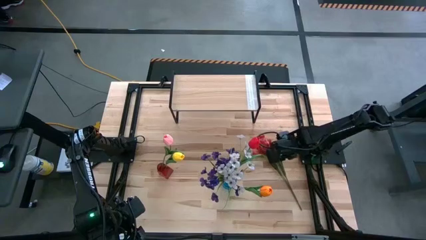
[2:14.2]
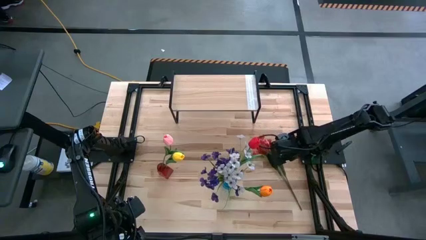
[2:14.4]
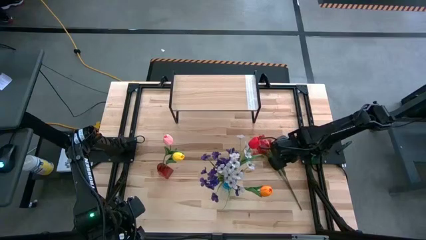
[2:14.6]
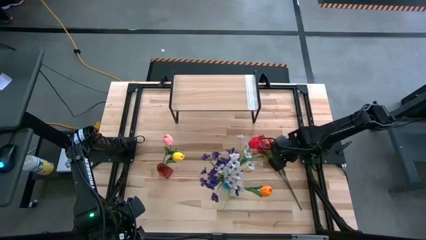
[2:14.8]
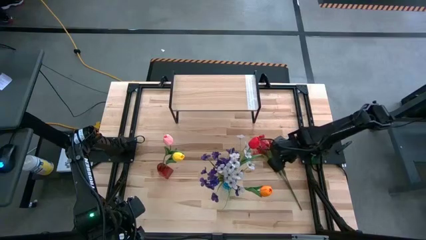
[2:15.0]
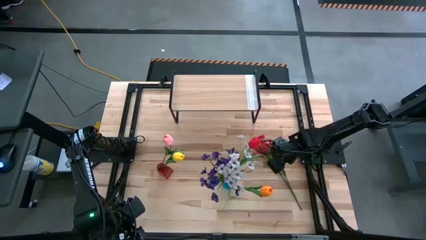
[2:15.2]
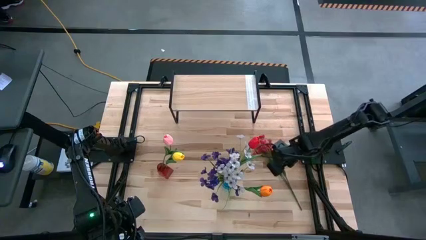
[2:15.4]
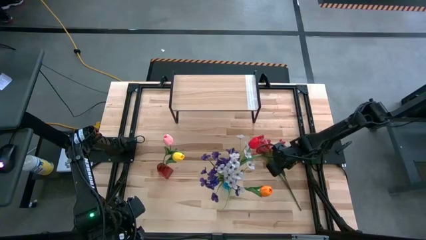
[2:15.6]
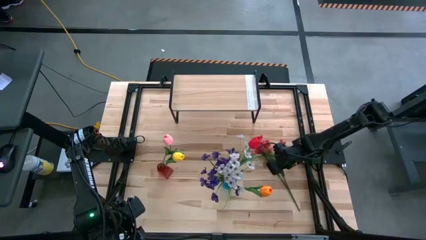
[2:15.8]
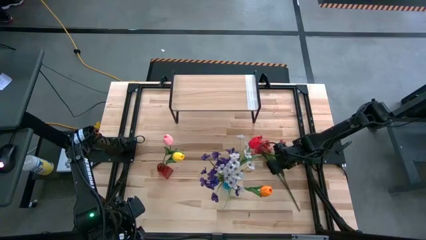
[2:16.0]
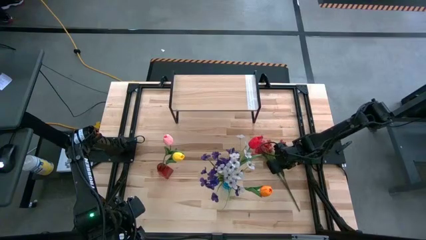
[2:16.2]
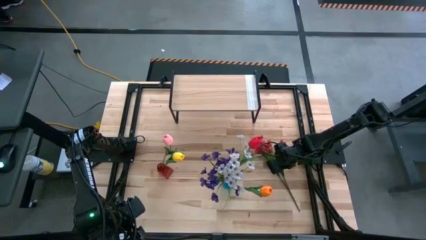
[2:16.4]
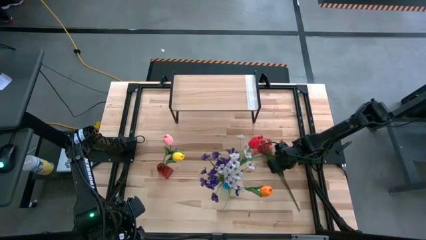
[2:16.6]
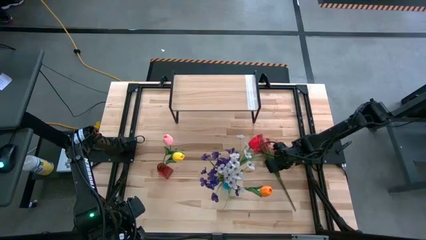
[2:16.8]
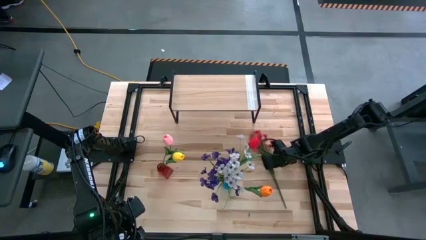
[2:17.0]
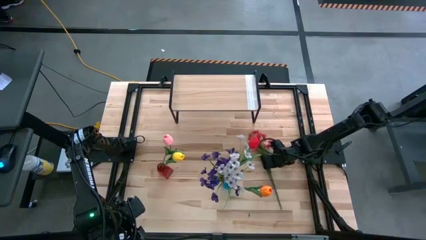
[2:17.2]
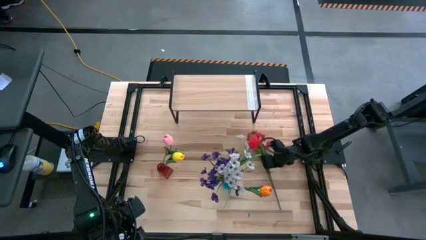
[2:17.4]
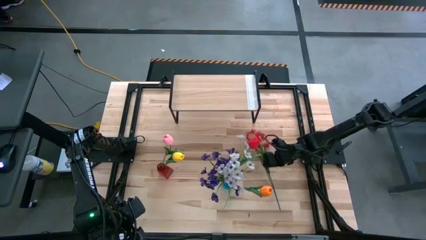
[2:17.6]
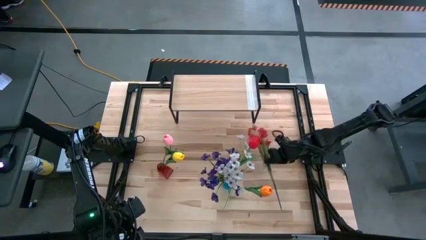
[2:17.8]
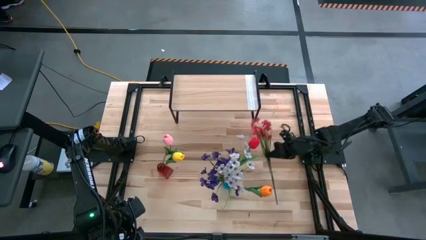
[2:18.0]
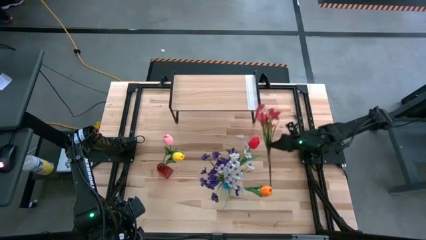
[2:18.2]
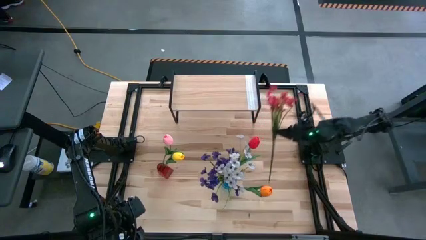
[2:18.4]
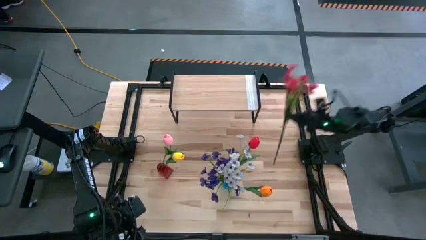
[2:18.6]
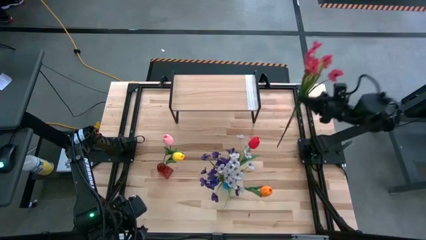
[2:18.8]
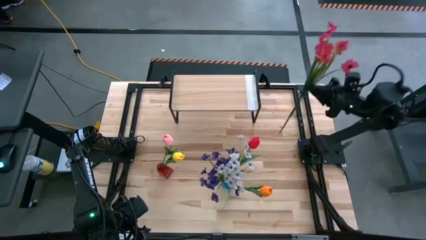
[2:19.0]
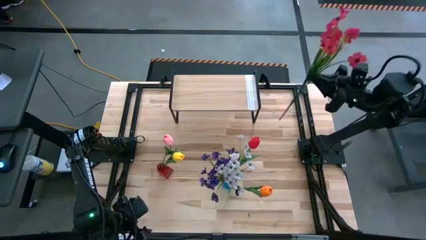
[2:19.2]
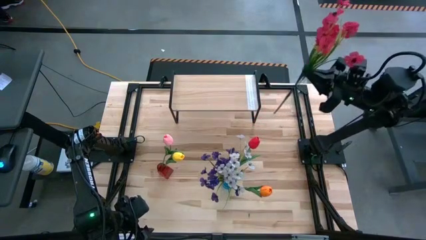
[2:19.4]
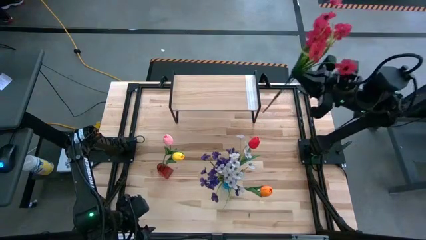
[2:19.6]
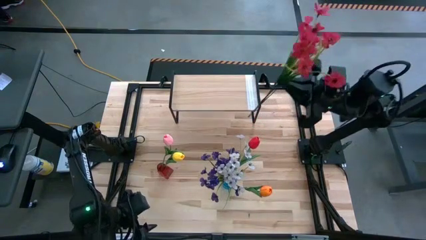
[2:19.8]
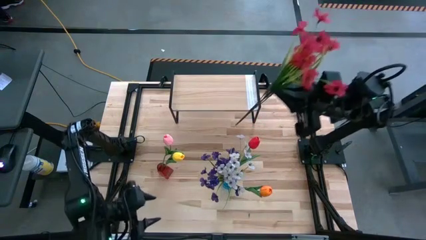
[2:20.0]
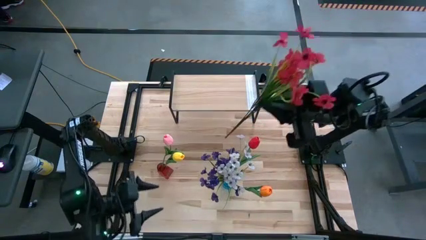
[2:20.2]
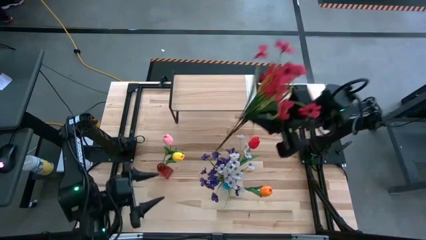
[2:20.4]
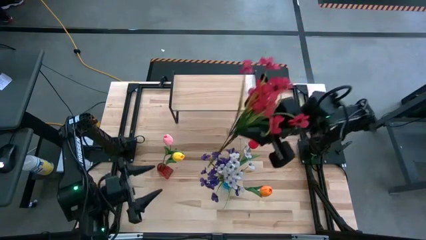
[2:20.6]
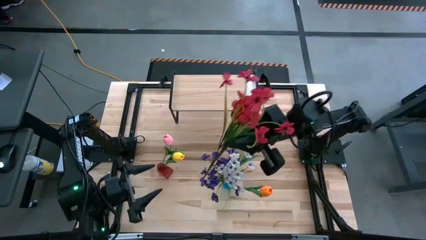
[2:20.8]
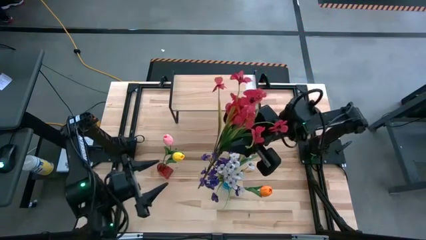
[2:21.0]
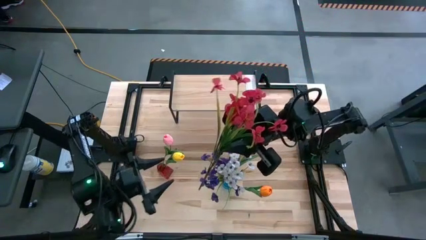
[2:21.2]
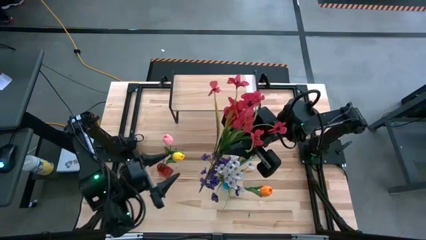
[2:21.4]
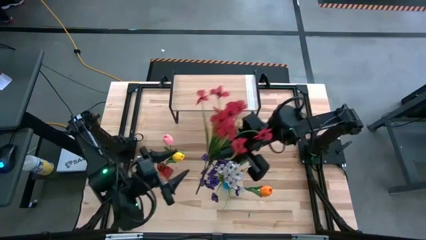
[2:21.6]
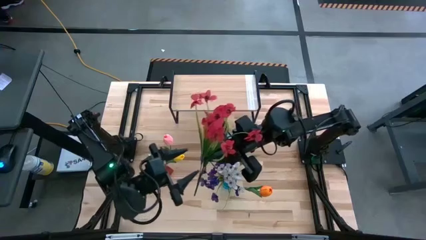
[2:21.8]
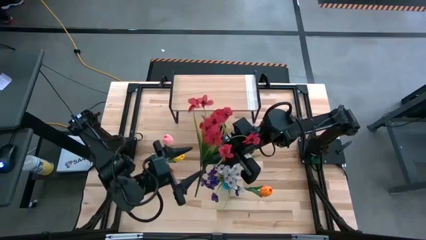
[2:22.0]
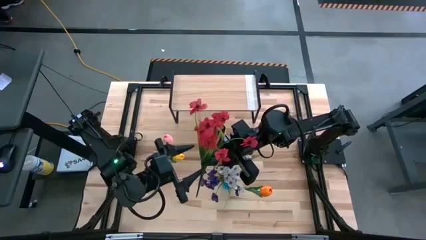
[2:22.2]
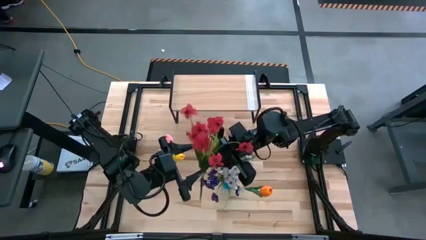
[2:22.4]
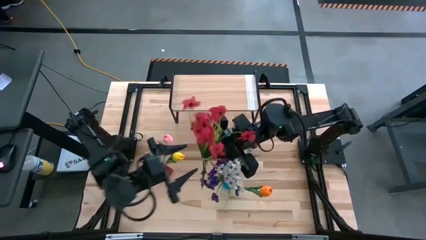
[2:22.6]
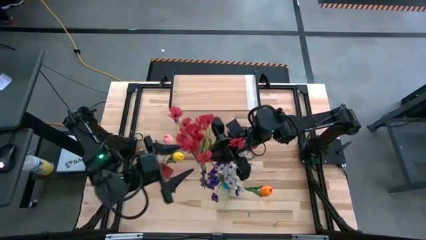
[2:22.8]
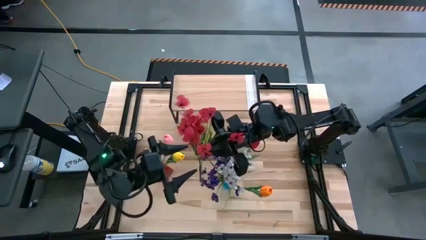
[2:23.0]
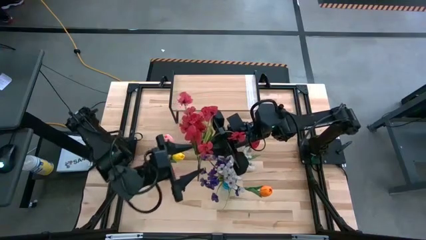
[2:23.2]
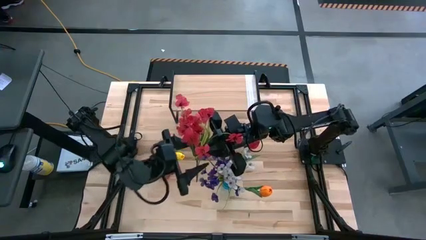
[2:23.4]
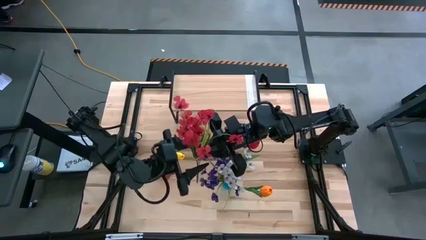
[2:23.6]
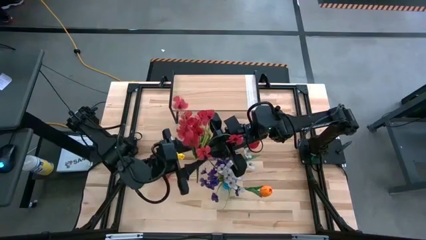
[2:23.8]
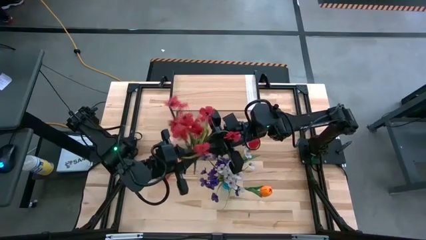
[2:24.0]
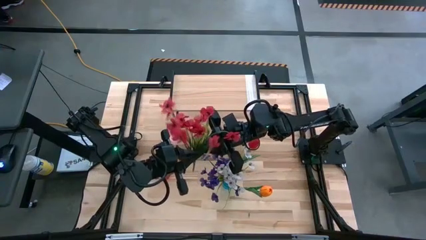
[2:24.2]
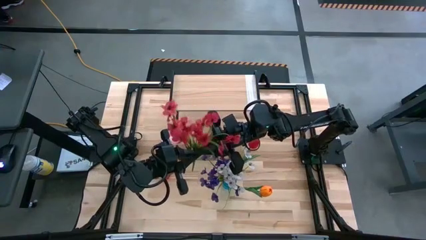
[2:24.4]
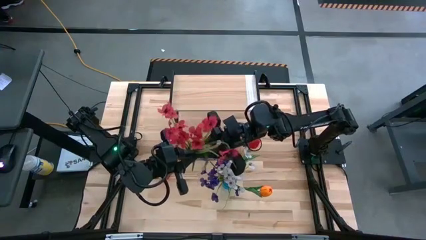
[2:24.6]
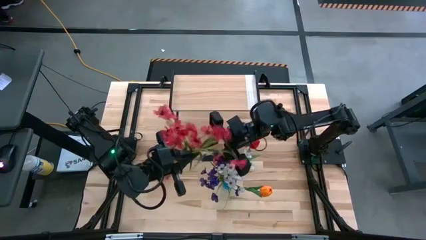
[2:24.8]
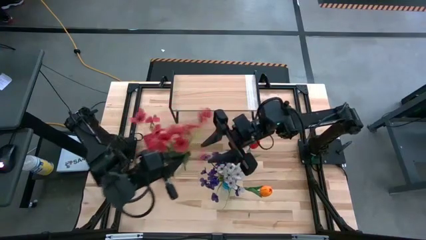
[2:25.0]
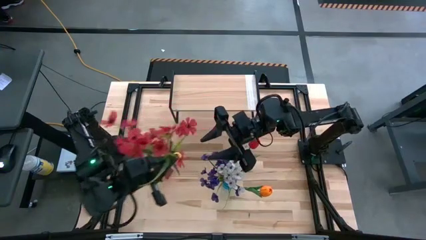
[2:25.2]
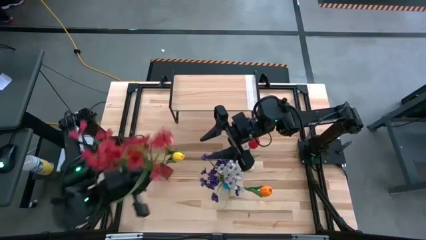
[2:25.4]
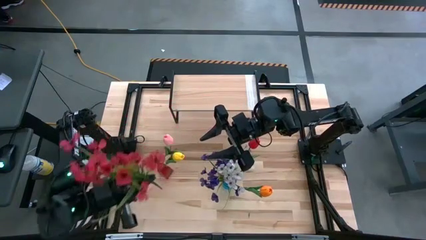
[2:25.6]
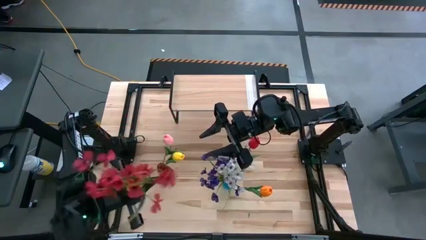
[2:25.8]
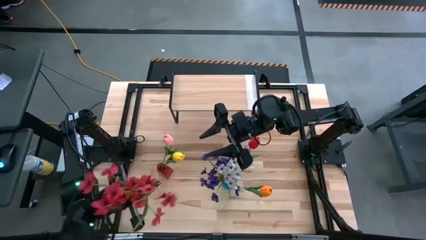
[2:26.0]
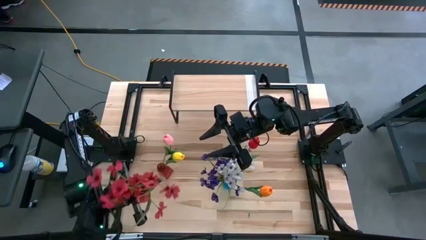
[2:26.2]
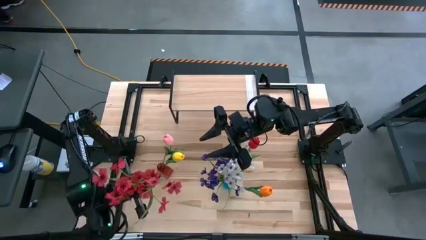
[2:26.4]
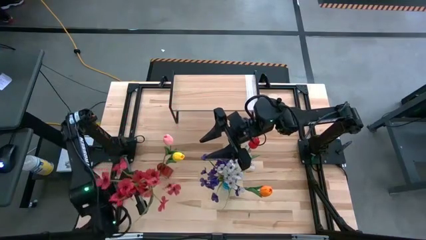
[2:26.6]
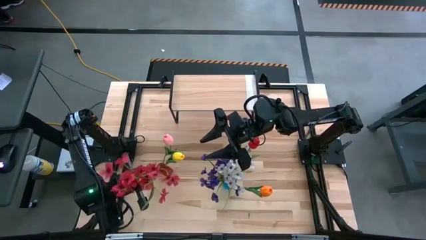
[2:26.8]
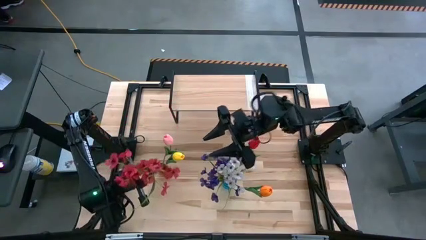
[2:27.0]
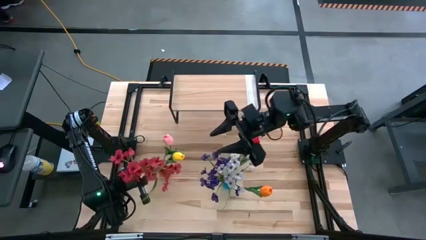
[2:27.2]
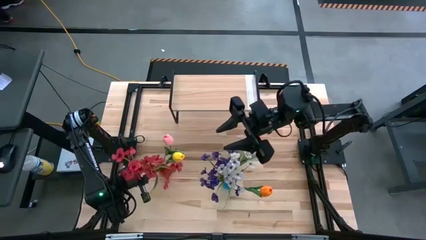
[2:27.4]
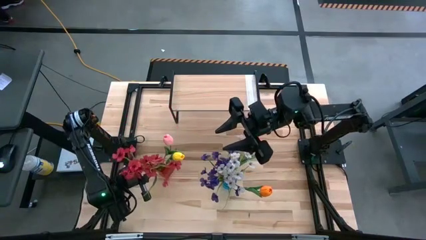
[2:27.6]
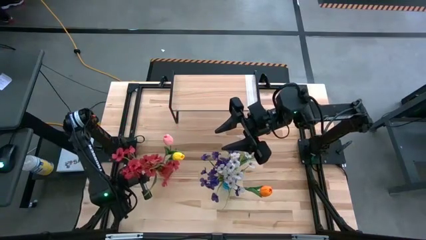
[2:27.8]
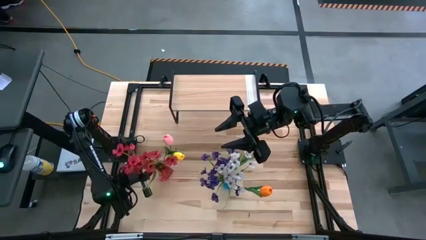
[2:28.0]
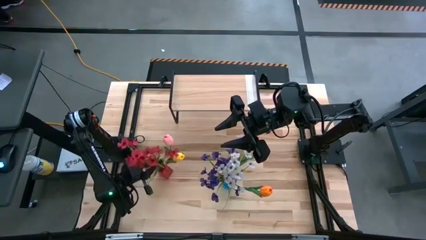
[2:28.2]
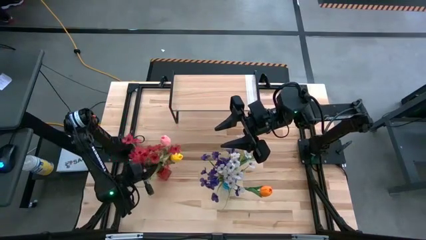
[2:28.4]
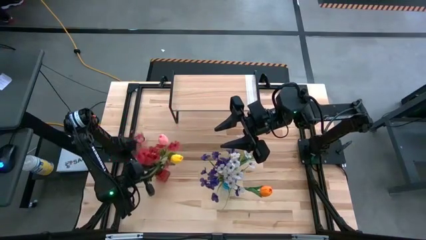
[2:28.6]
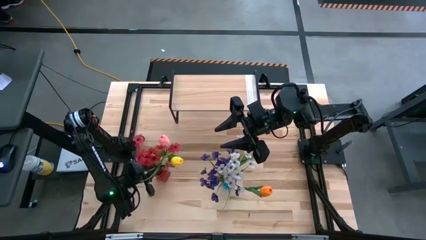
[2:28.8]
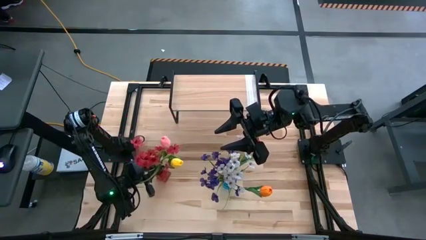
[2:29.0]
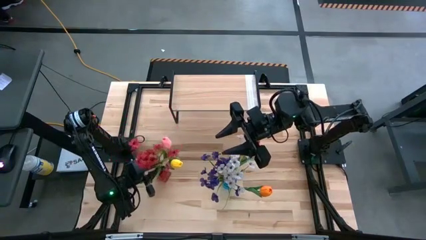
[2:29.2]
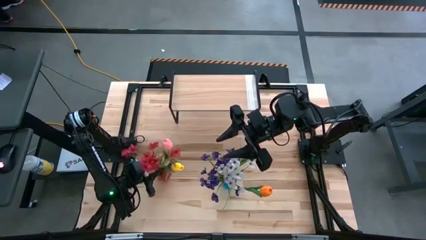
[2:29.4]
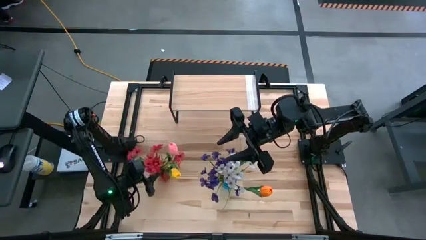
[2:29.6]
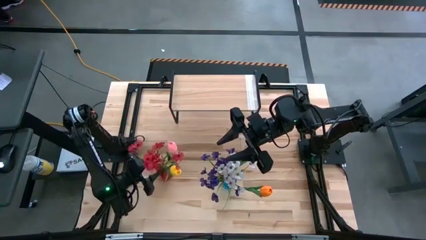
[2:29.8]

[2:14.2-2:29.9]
Task: Pick and place flowers into a vace then onto a shelf
Put the red flowers into the red vase
